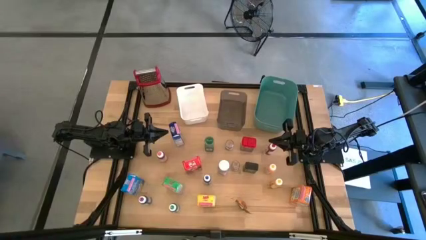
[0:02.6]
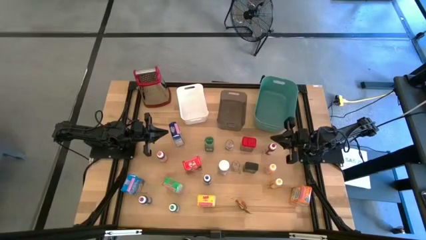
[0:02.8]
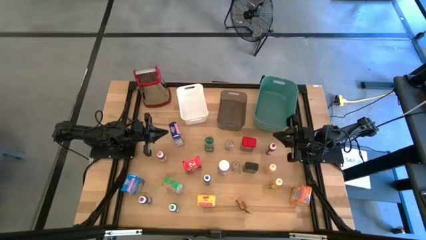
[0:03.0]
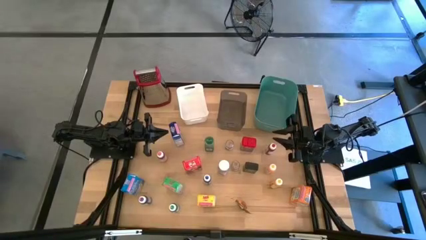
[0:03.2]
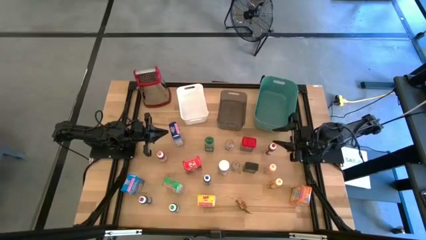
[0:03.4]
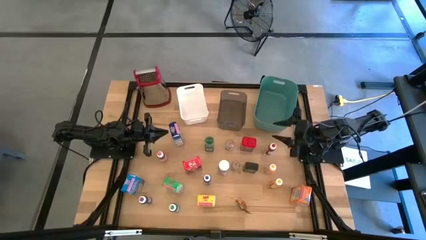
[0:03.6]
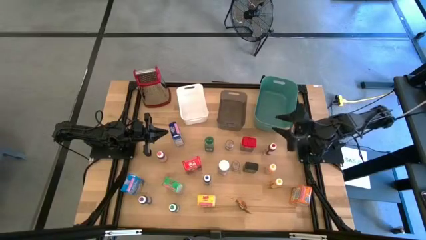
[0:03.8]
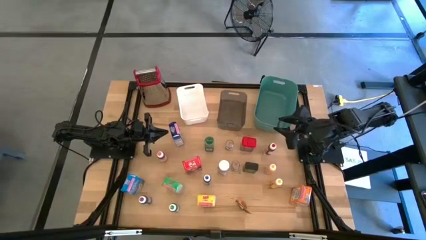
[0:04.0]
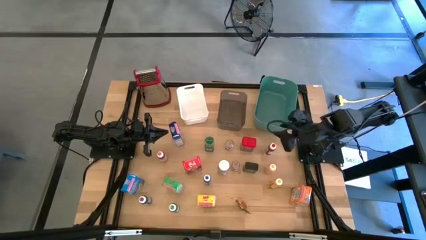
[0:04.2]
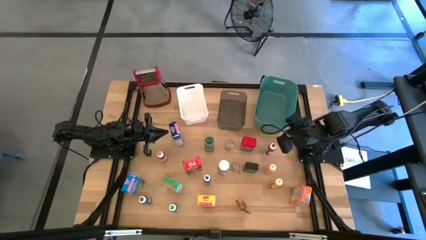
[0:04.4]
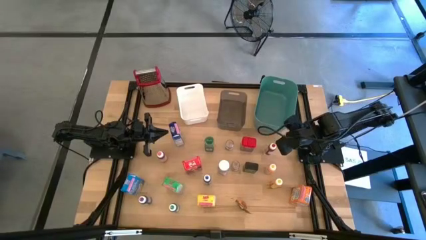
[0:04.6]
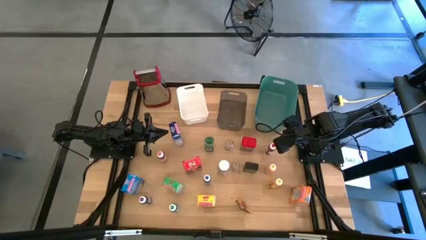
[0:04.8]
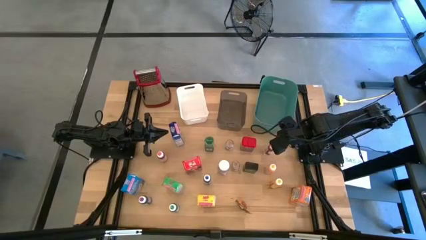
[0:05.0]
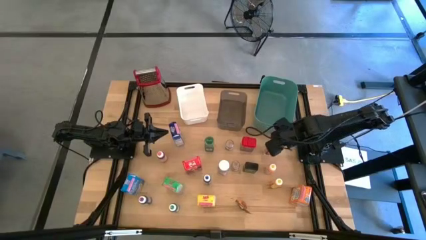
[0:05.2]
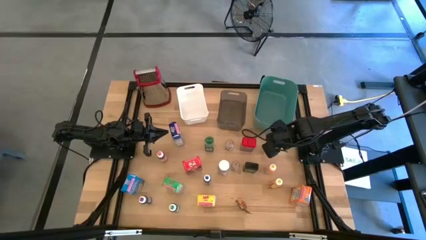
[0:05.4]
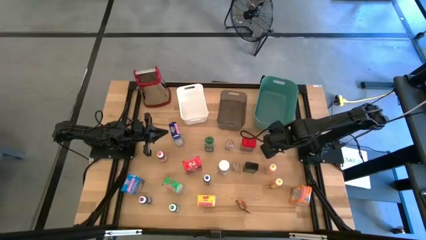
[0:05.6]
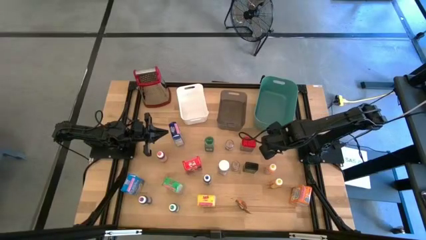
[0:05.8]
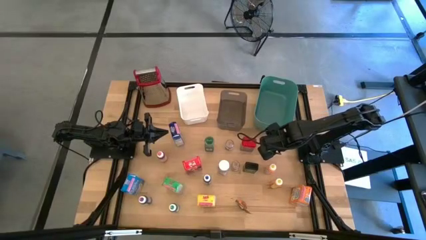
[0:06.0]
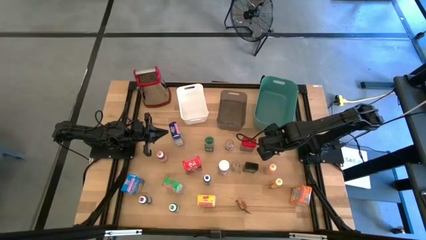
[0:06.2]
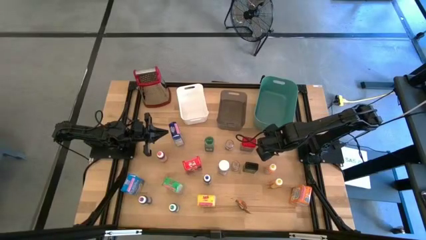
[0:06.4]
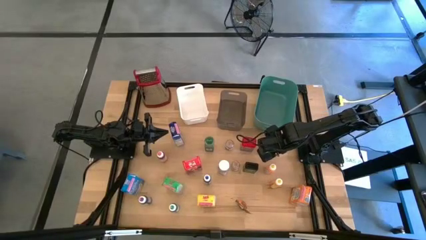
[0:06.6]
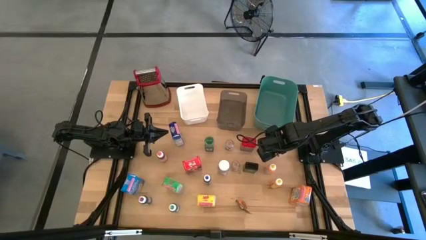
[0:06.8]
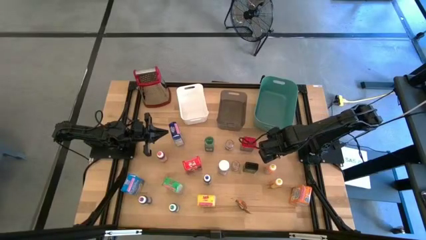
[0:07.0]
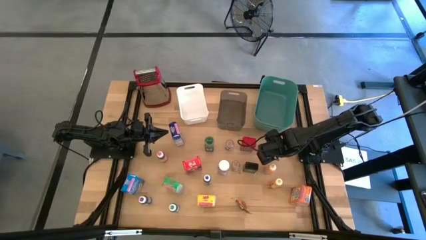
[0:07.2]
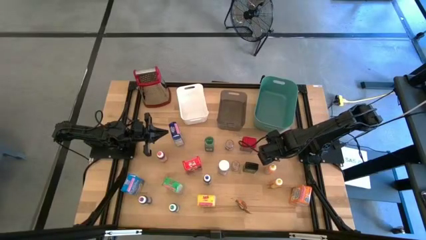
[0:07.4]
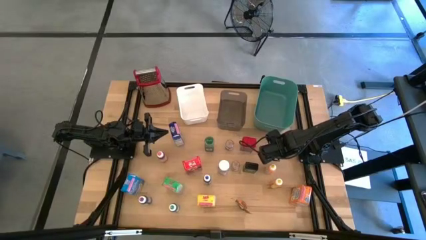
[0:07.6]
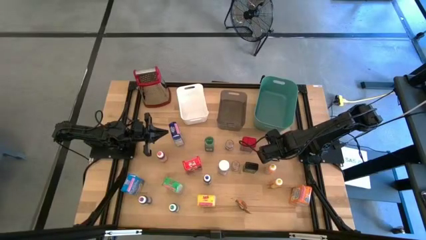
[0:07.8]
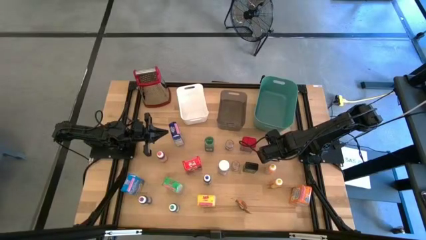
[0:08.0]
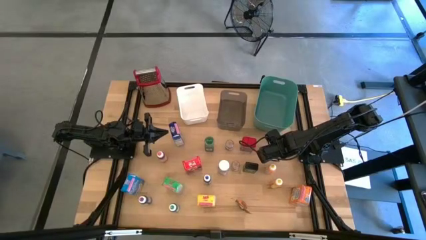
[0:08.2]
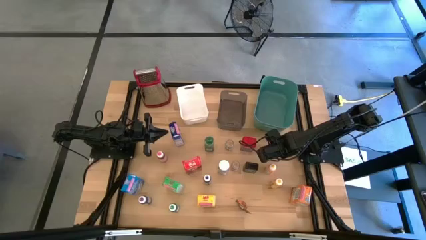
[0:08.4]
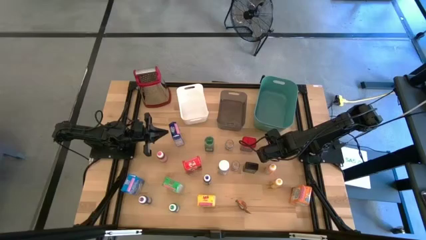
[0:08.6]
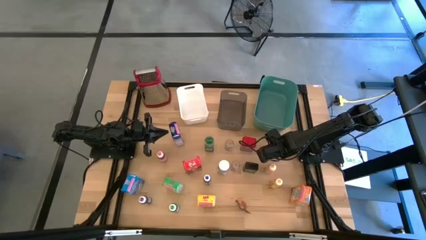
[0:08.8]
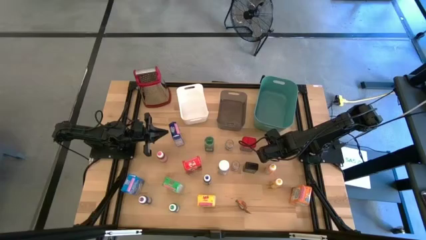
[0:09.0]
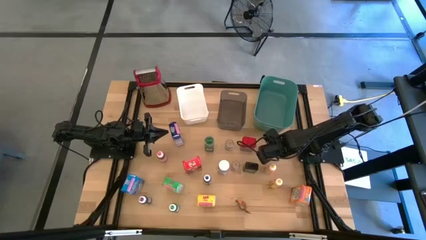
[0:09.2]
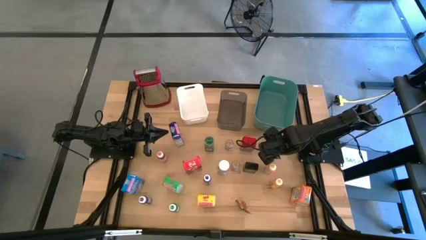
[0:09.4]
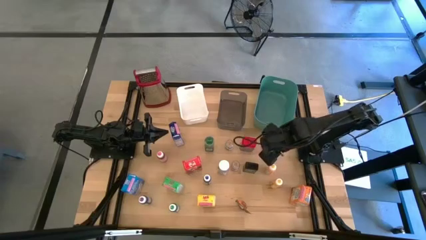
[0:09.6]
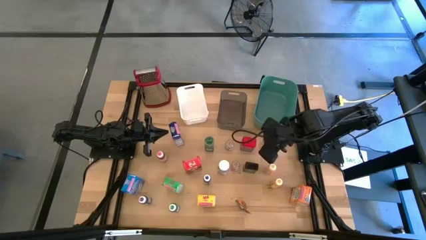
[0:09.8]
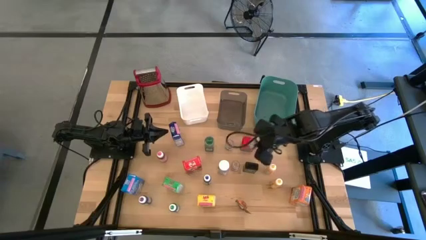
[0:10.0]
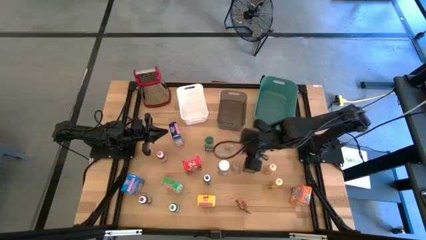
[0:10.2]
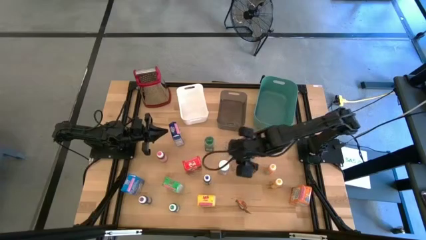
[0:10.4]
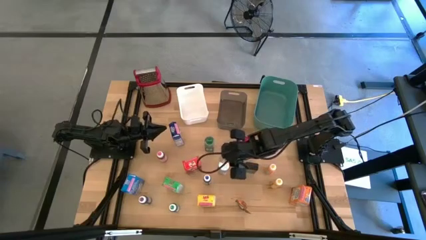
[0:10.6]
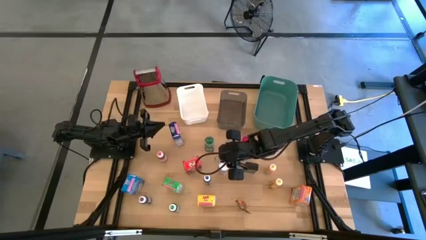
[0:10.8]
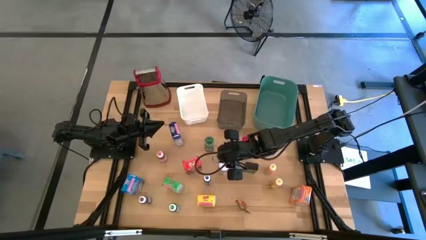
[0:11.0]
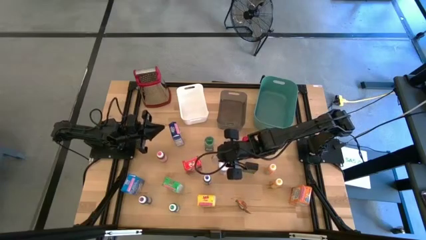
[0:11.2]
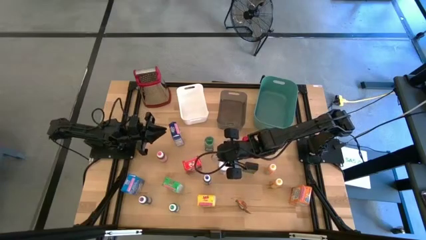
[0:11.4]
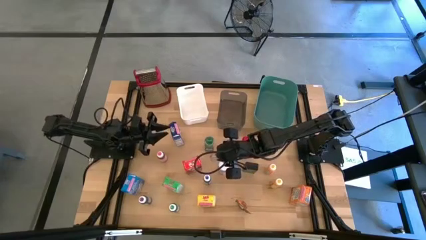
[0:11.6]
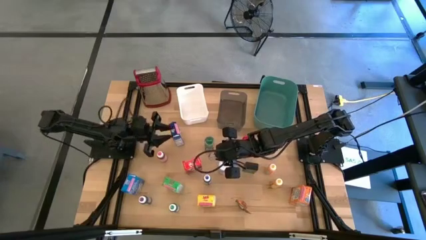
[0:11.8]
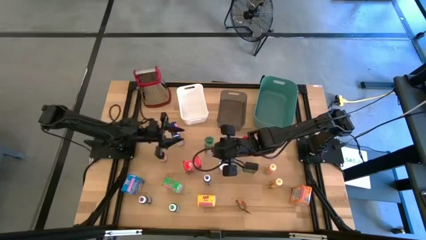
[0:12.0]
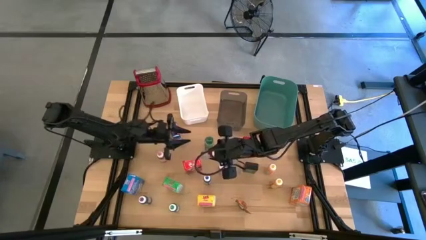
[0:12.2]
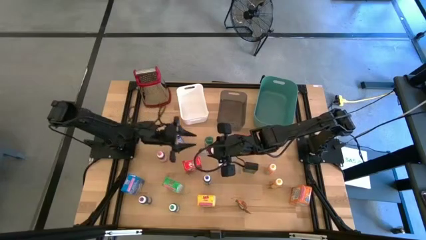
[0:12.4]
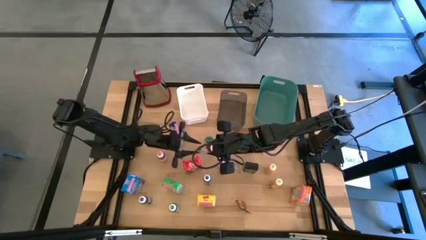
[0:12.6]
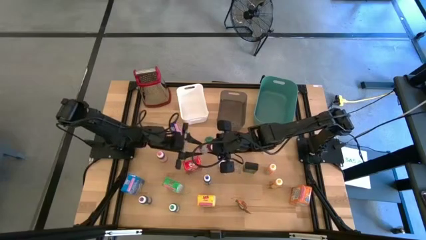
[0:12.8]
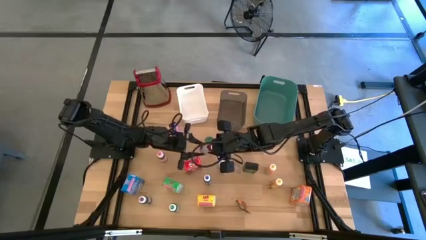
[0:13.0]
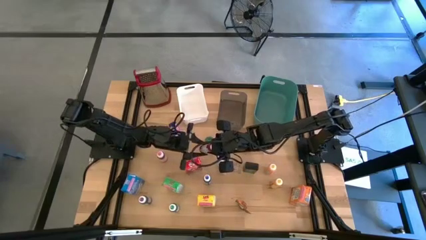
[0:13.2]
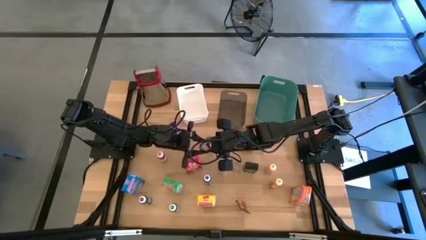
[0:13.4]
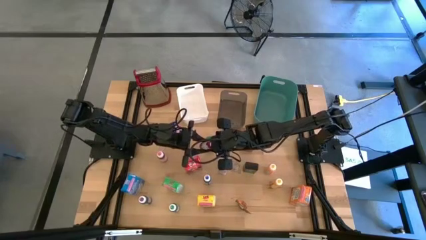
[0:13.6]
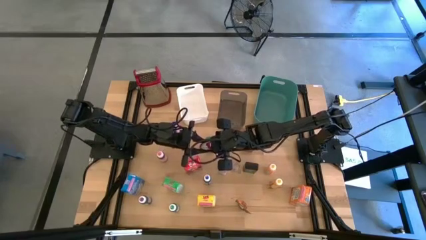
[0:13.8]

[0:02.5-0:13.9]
Task: Pick & Place Kitchen Items
Put the red food coloring into the white bin
